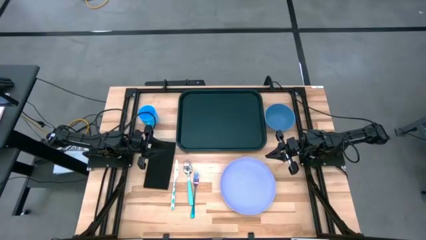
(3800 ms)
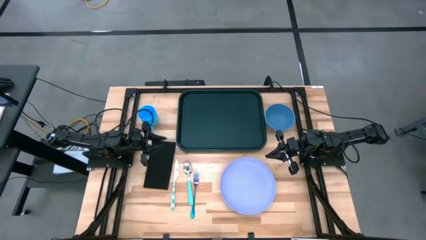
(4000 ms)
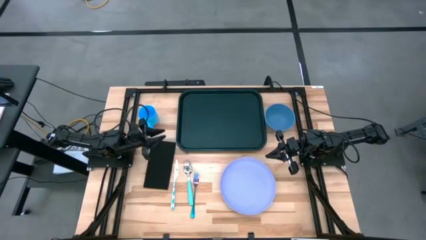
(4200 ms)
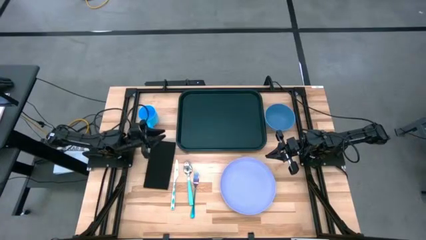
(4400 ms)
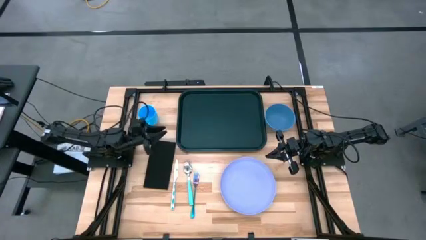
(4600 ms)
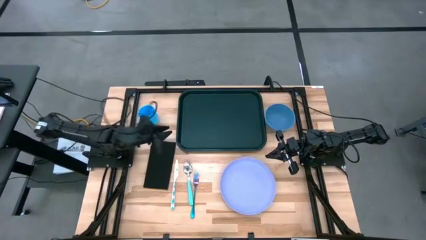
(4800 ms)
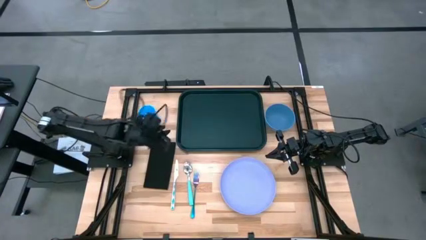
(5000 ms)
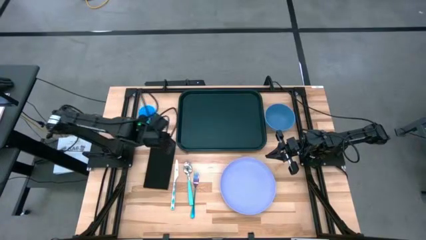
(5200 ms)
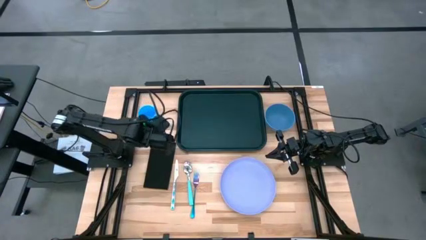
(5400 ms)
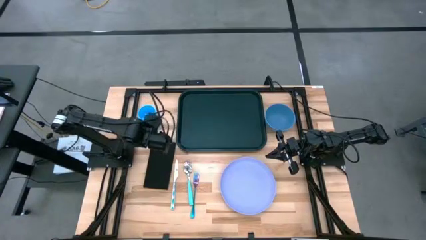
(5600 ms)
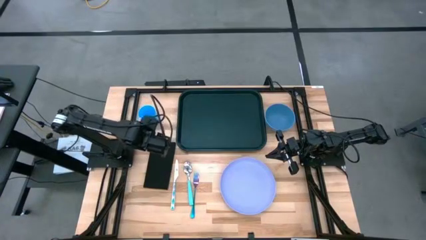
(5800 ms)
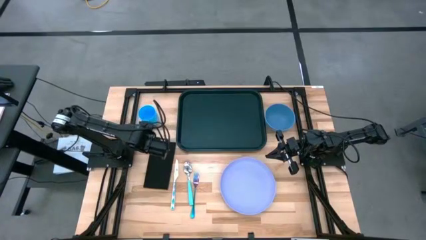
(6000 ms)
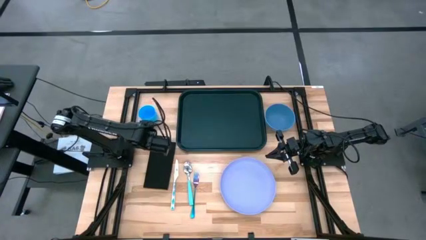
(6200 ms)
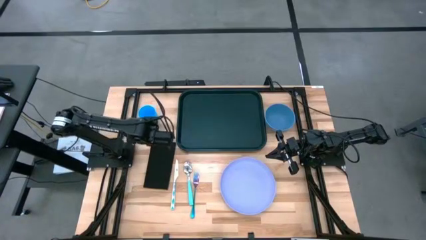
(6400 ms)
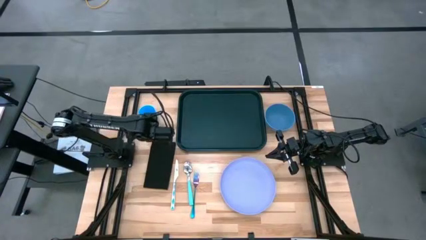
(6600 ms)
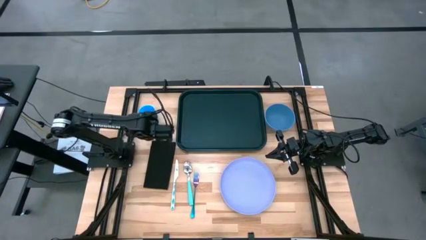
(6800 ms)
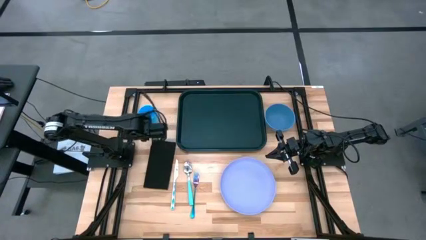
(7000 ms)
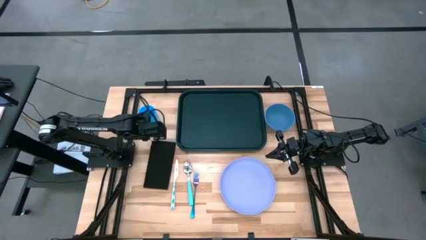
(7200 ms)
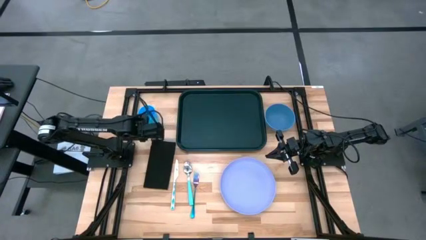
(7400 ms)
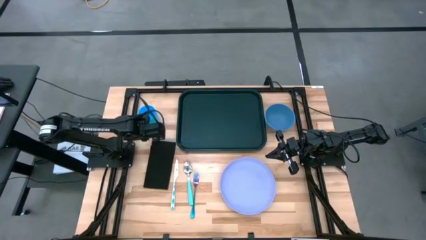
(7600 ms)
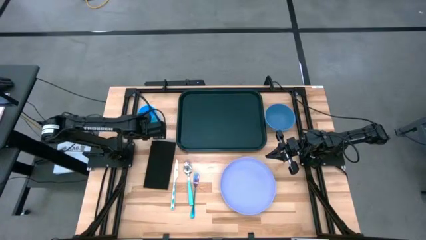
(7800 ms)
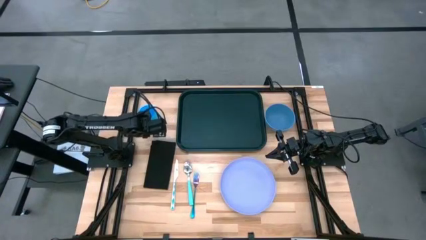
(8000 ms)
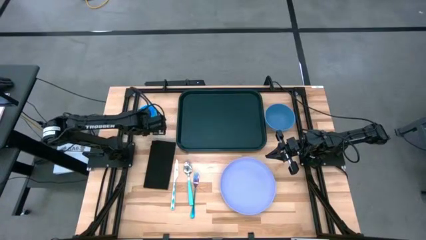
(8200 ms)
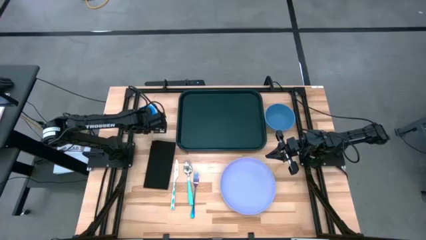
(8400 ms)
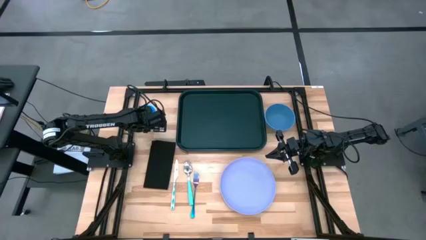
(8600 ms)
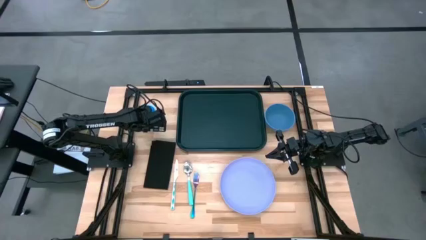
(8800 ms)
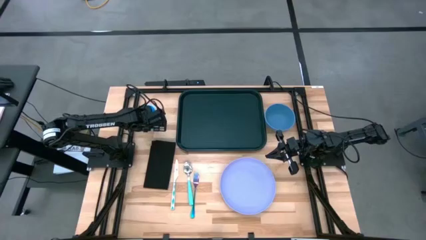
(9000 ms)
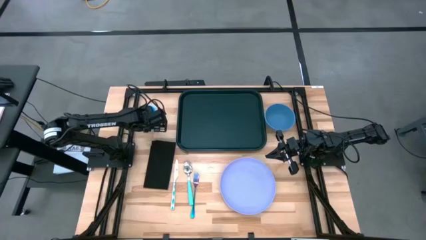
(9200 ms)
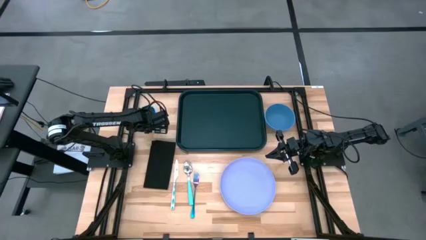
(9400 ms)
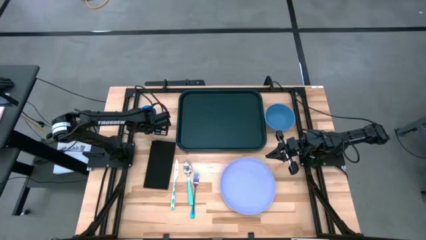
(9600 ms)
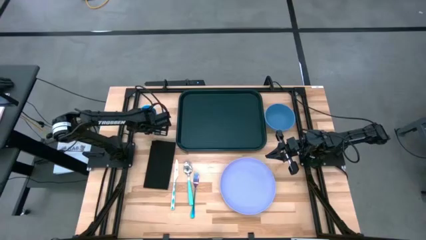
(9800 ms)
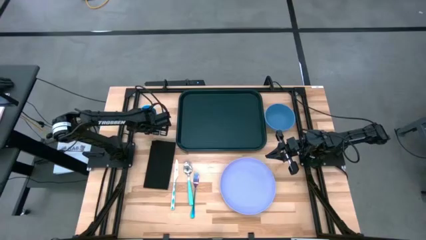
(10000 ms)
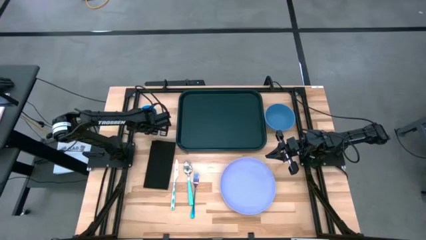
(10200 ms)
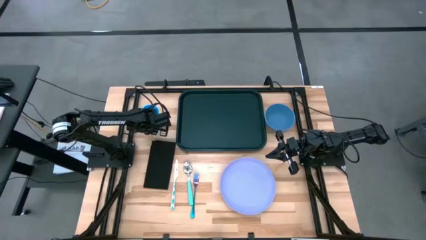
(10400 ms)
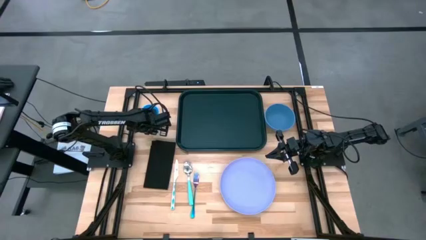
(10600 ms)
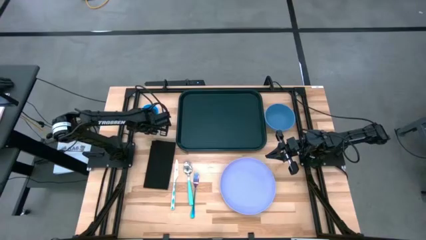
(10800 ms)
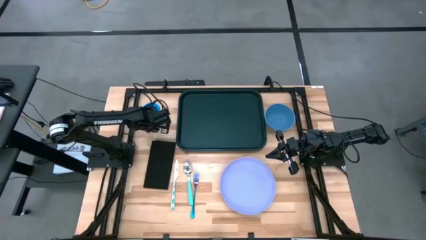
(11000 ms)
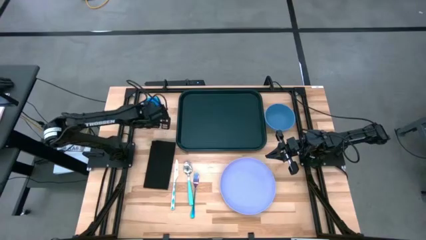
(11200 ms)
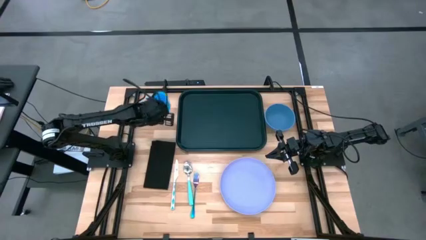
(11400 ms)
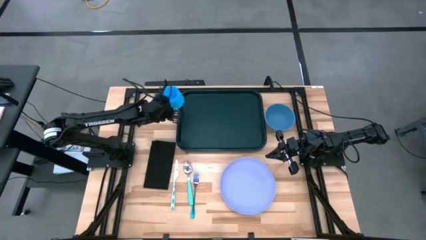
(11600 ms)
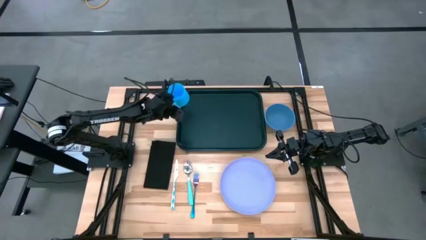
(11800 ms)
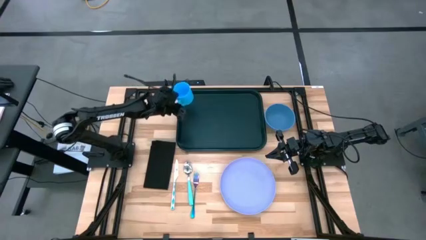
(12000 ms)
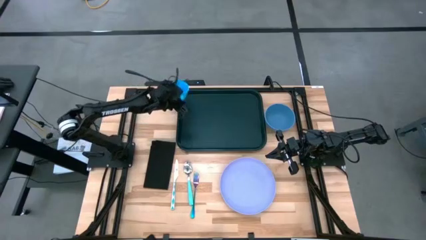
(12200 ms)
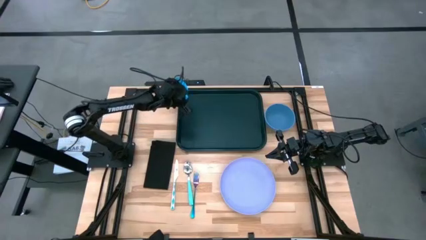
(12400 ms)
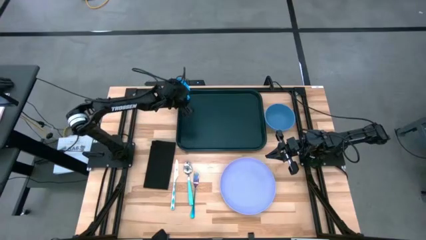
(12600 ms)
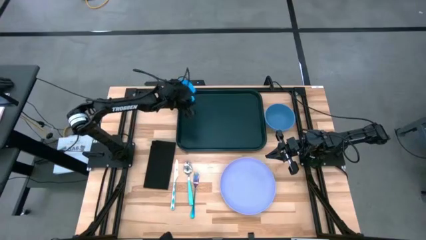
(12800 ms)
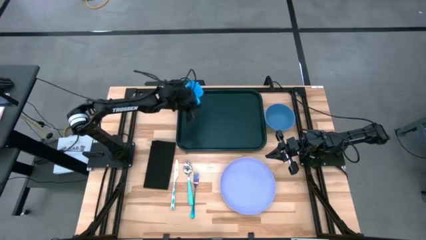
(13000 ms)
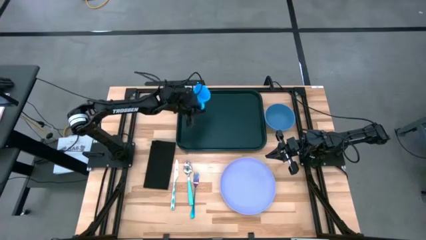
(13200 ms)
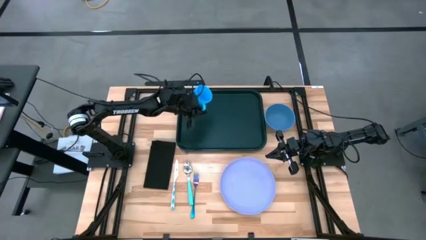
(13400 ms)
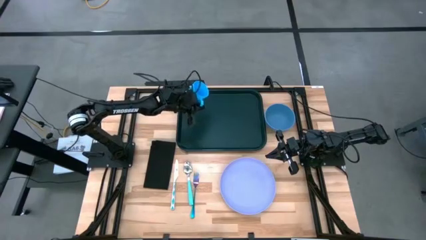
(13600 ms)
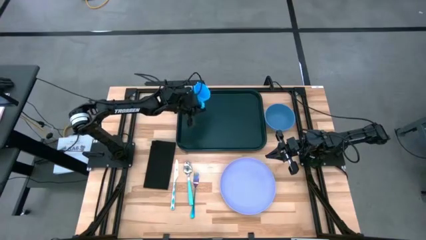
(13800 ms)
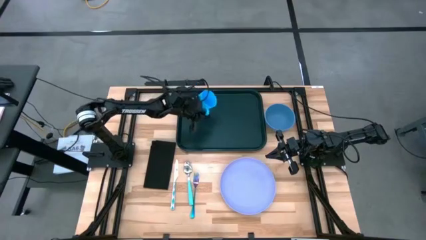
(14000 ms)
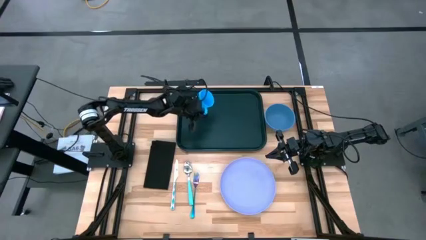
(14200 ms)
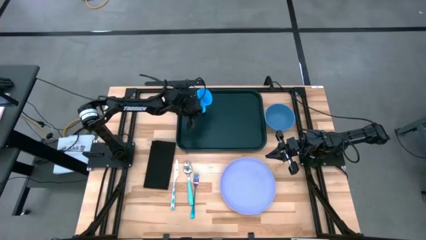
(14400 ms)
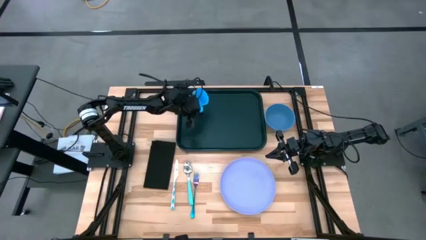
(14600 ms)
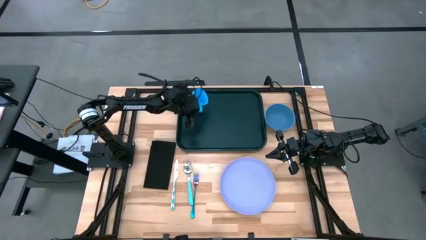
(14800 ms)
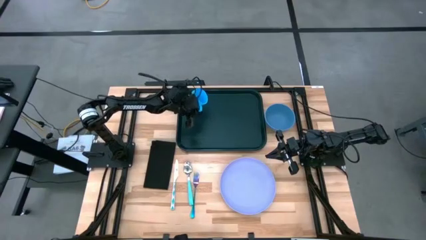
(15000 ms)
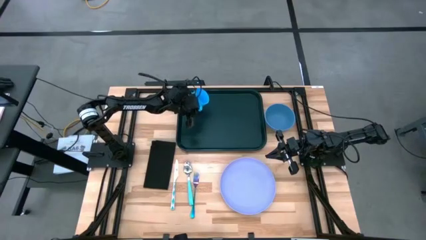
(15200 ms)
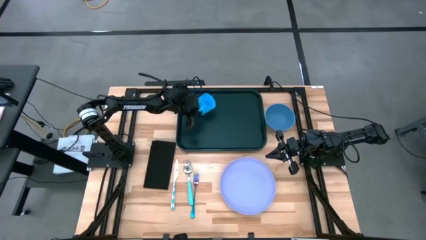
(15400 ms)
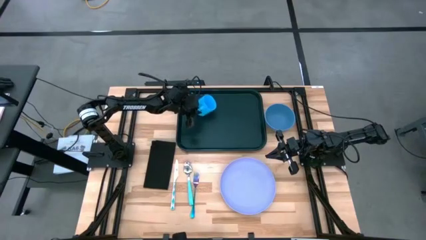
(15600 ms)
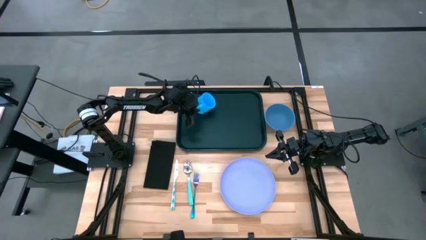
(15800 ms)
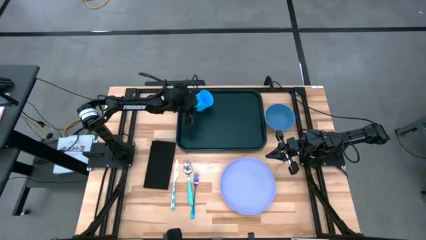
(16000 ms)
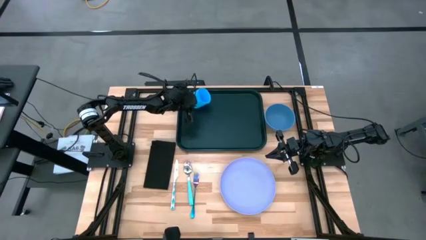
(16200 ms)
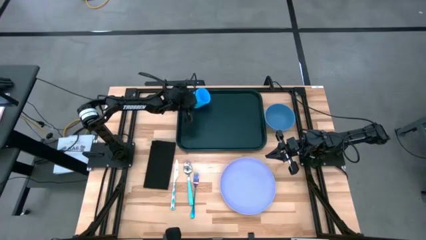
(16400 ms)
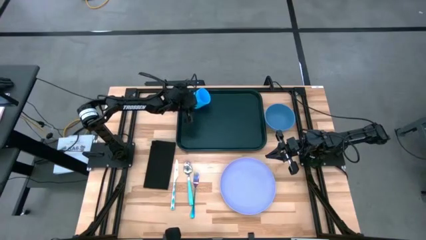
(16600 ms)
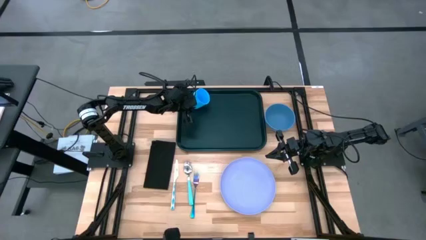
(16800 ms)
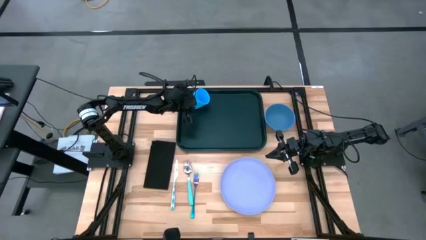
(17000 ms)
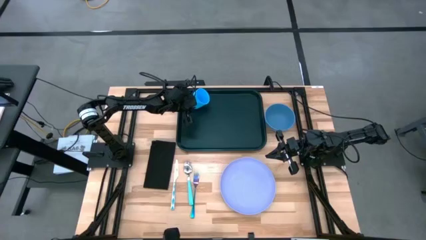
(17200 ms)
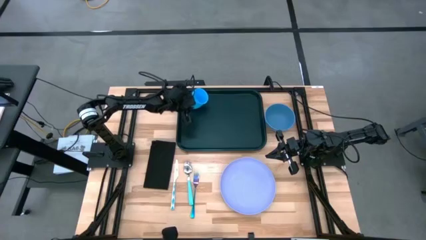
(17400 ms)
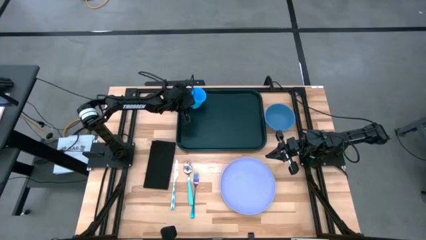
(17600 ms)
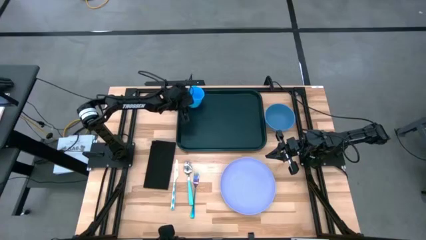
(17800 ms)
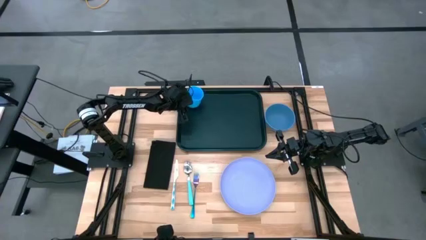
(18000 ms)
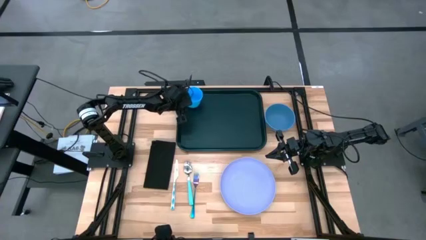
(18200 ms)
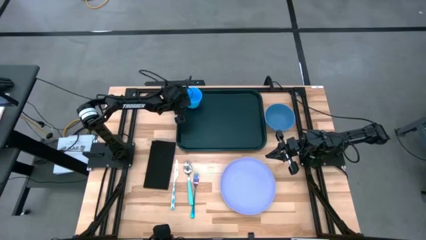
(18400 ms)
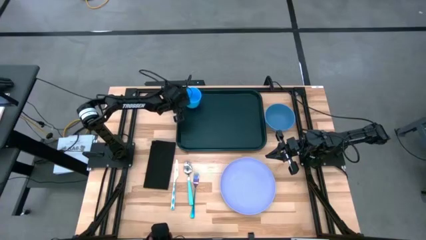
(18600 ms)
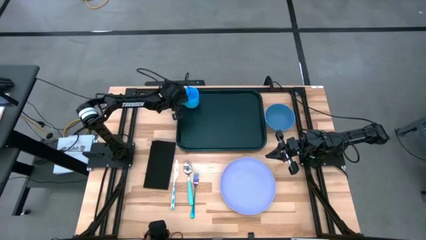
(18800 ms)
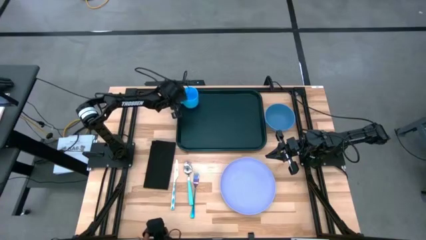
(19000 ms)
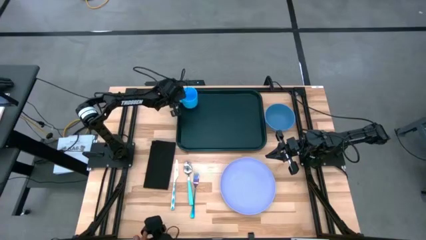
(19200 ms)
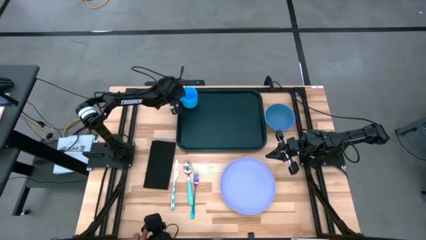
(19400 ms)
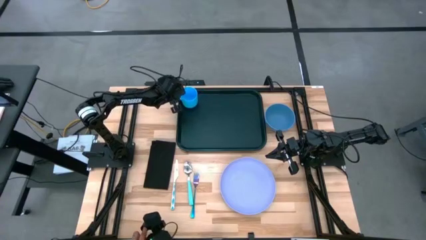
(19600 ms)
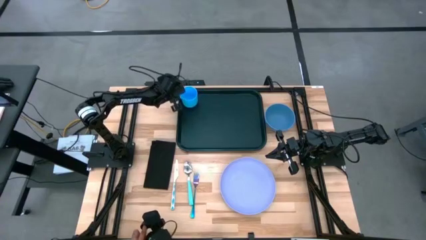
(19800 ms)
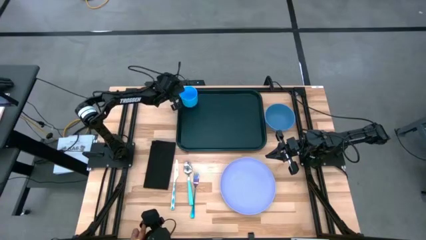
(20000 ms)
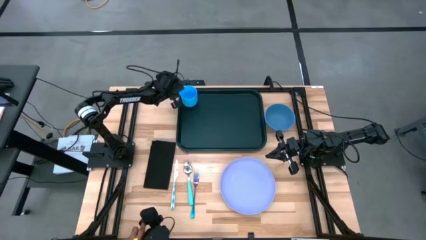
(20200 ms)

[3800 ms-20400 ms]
Task: Set up tray
Put the blue mug in the top left corner of the black tray
